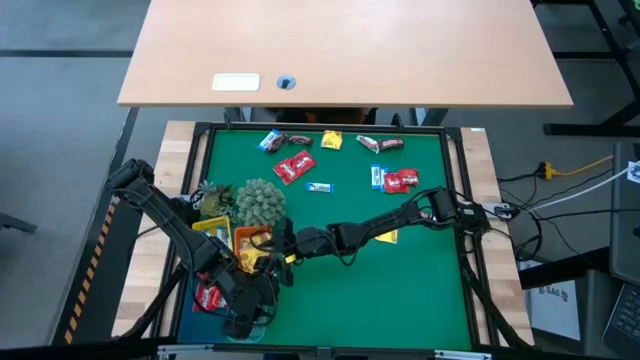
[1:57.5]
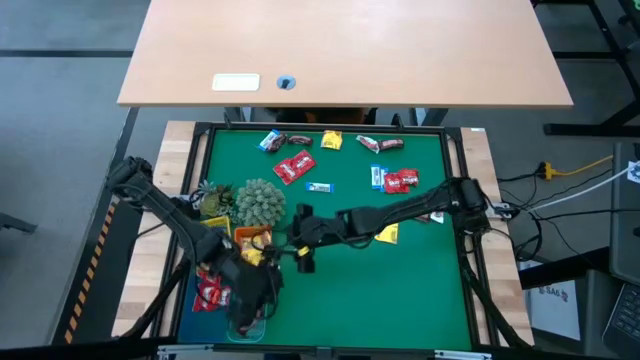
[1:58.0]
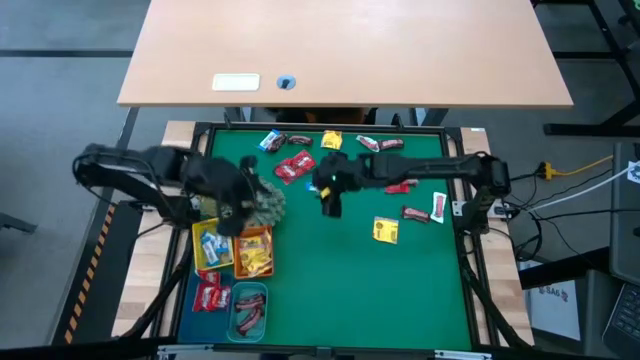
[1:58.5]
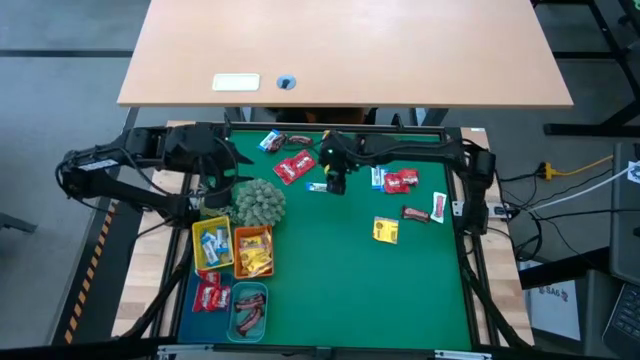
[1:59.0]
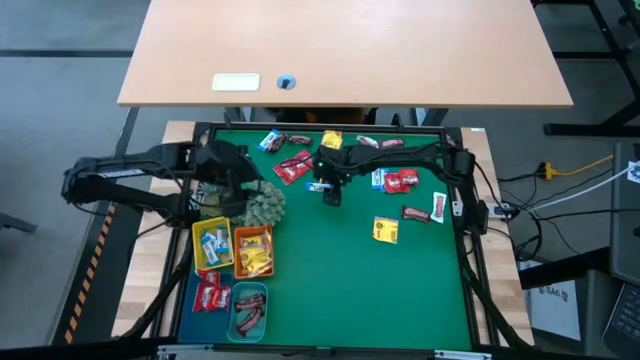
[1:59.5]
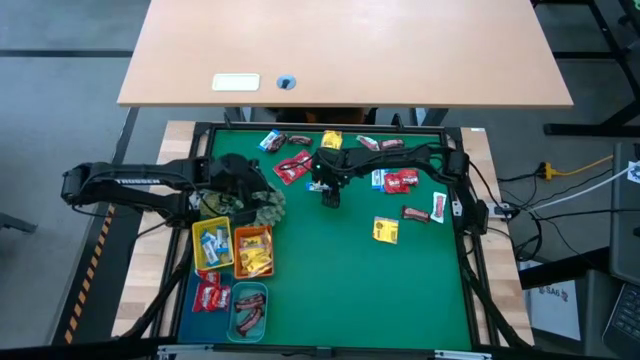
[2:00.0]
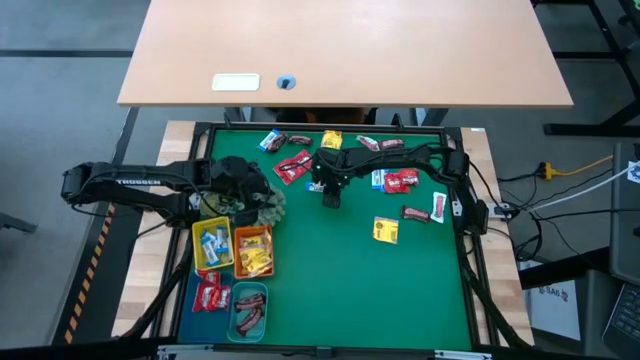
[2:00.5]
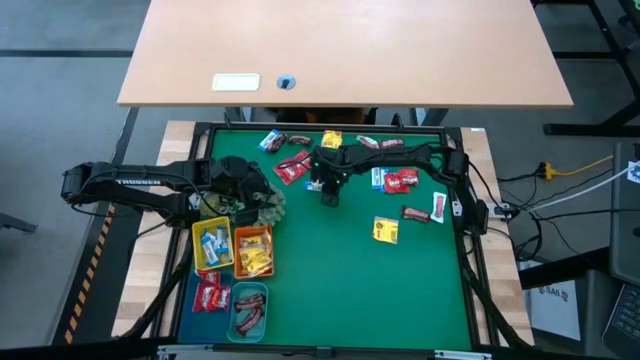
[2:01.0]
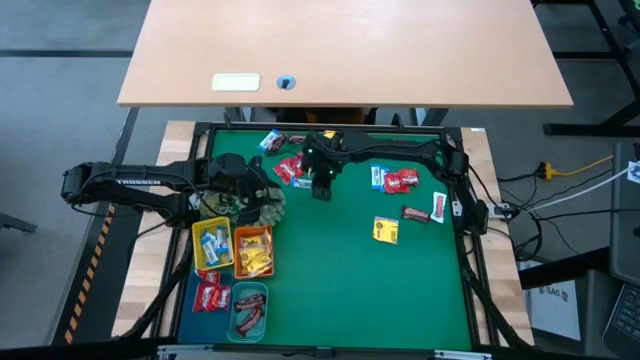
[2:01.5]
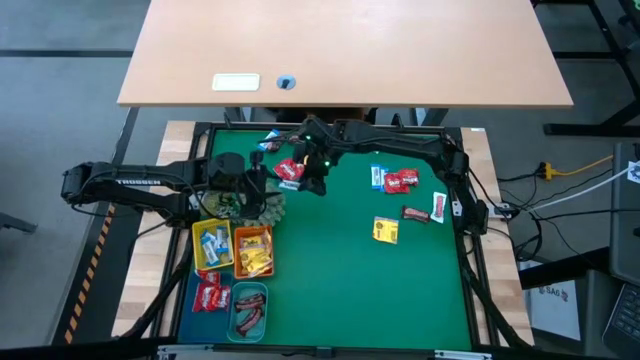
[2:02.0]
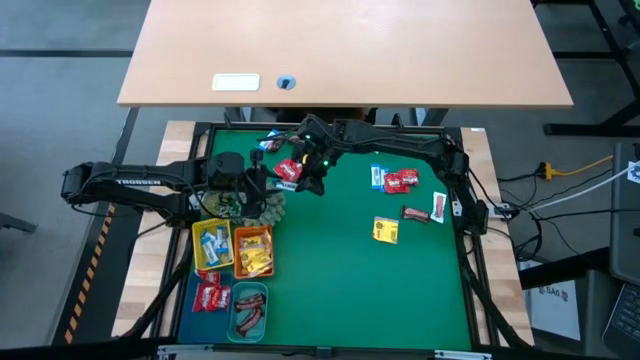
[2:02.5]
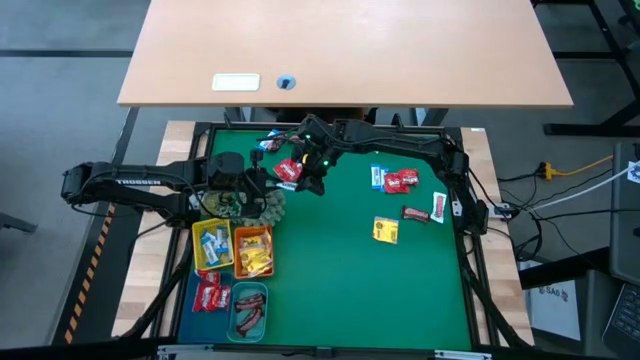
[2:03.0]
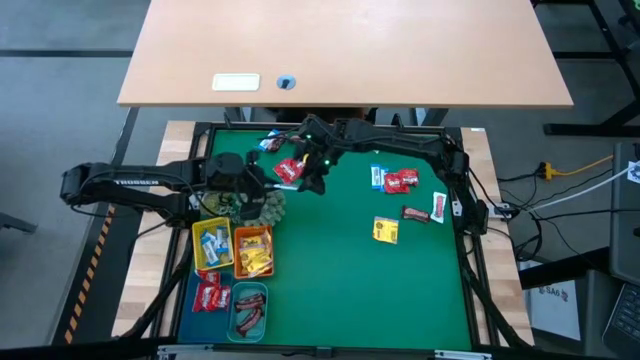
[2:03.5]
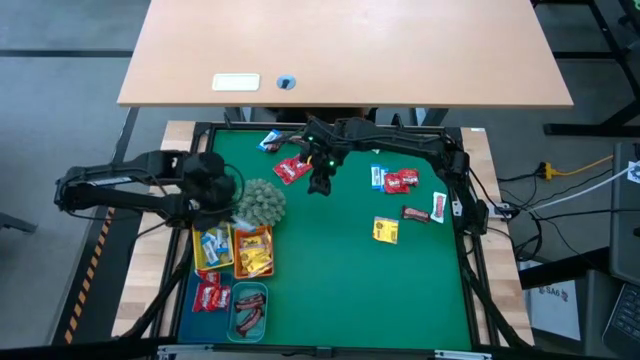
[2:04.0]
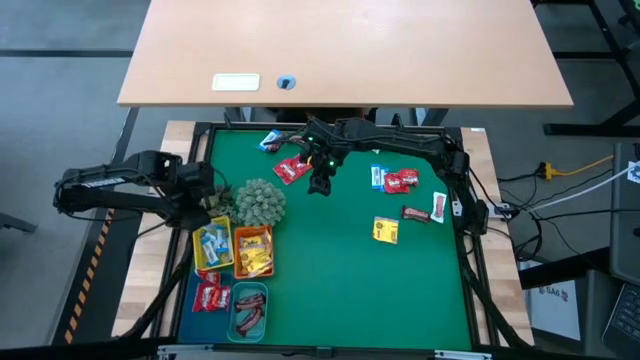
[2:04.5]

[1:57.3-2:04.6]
Task: Sort candy
Put the white chocolate into the yellow basket

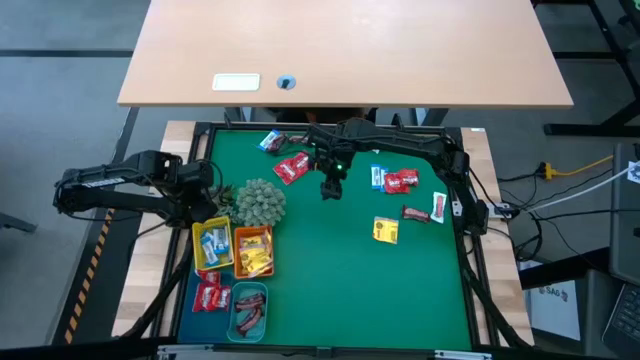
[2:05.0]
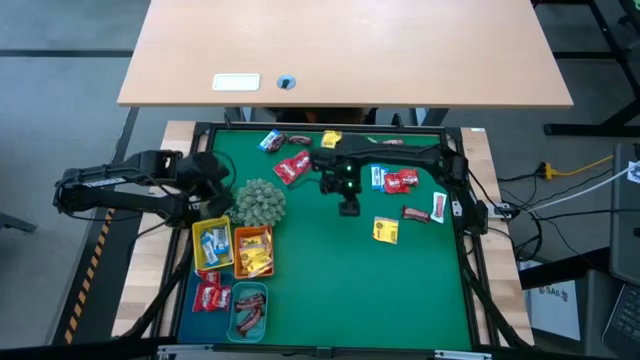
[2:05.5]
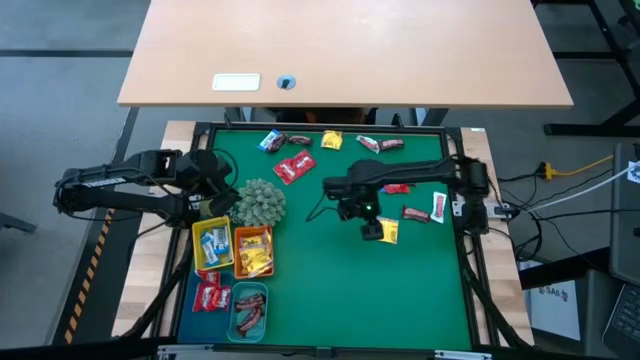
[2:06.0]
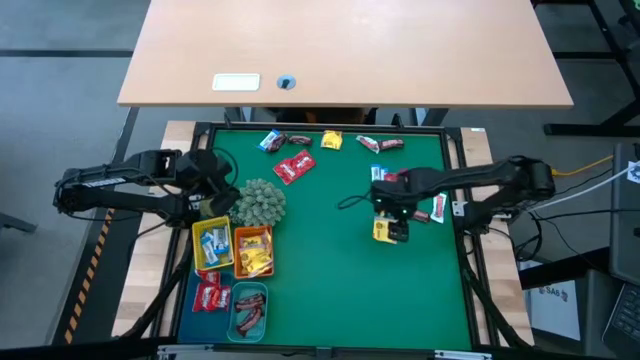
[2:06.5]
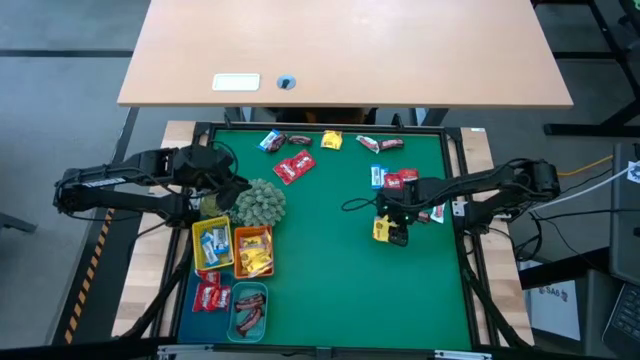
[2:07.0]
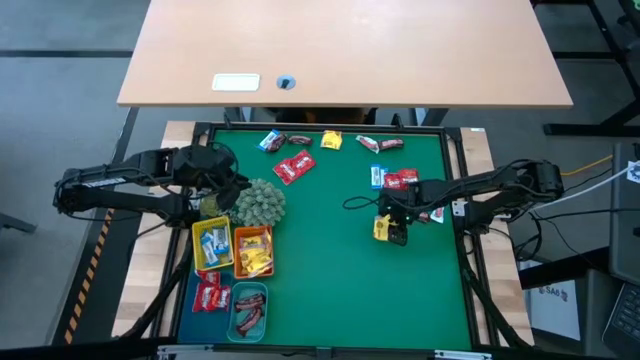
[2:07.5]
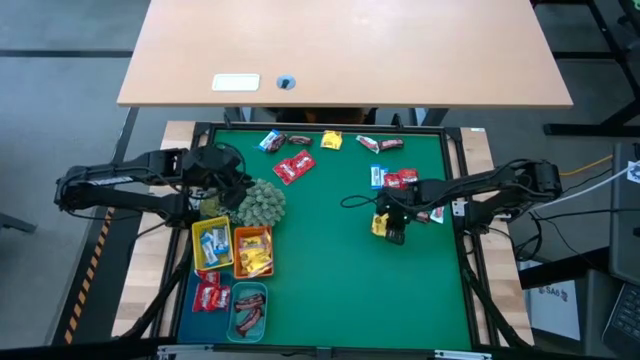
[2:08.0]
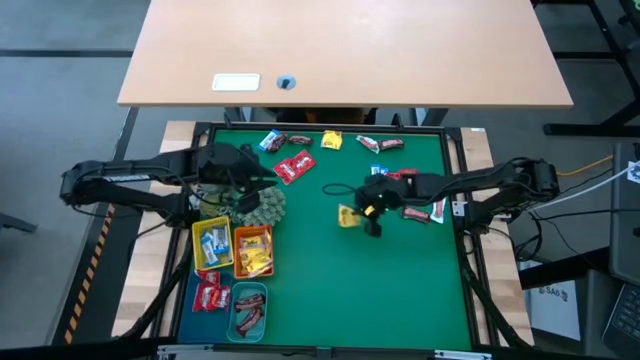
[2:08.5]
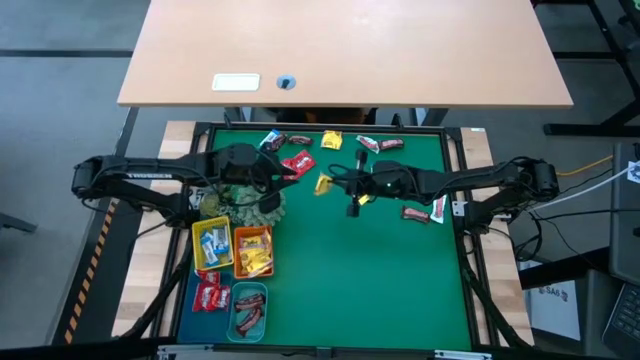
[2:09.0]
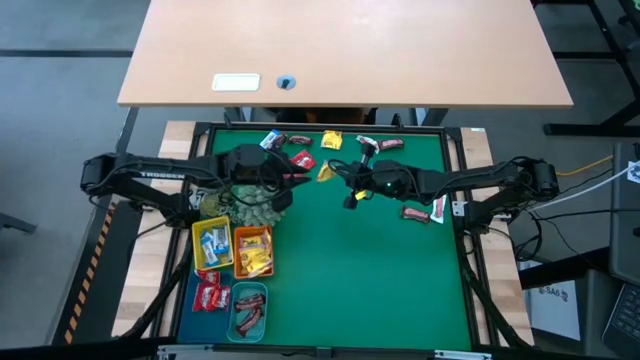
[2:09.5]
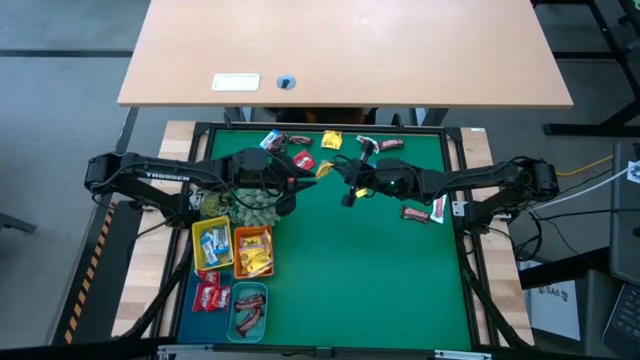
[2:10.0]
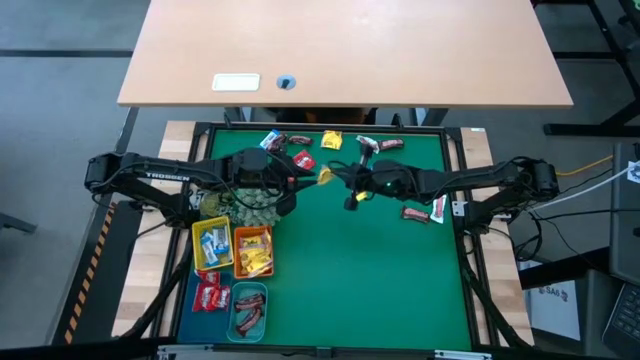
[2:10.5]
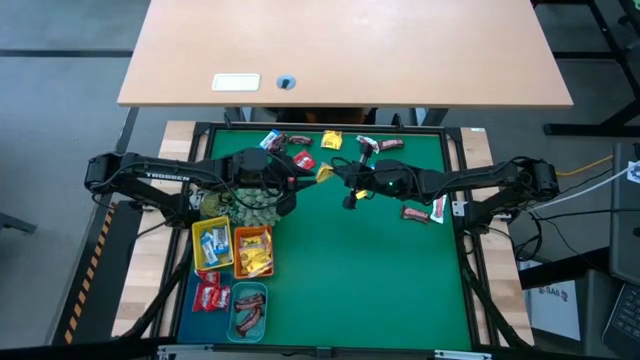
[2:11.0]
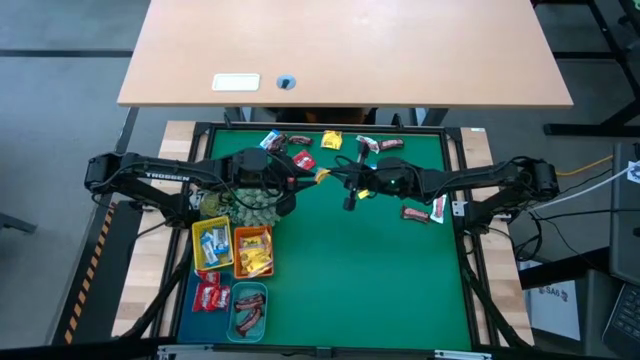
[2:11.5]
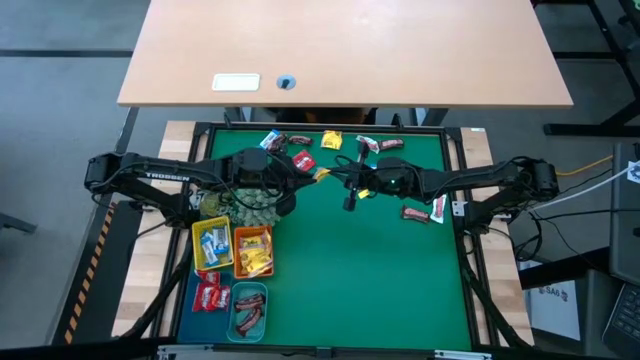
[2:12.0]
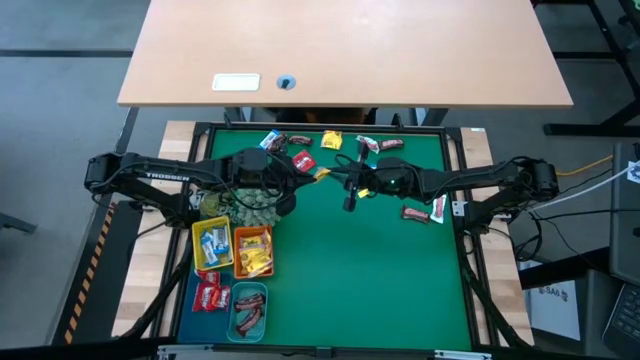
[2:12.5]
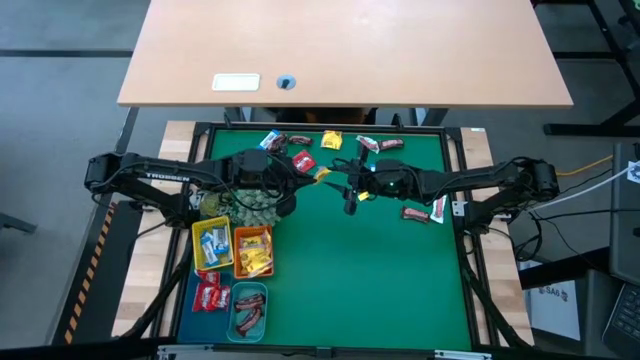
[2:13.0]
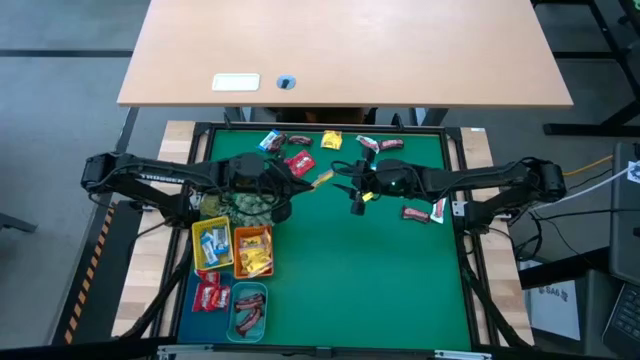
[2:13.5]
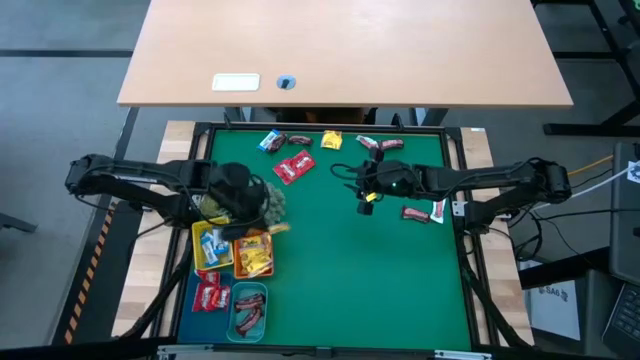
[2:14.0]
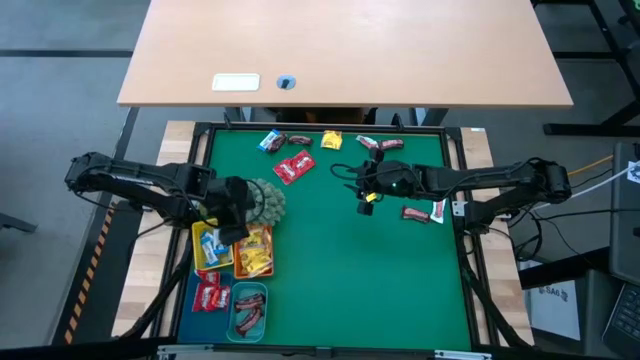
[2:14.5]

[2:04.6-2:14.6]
Put the yellow candy into the orange basket

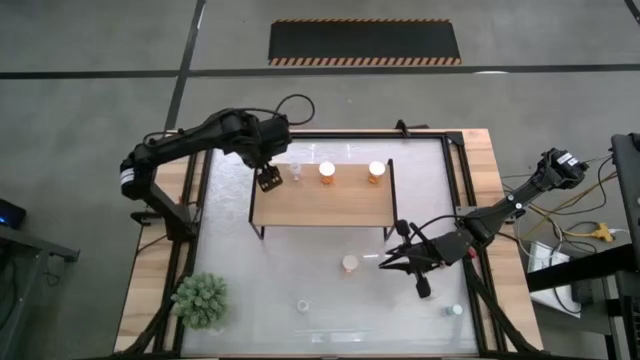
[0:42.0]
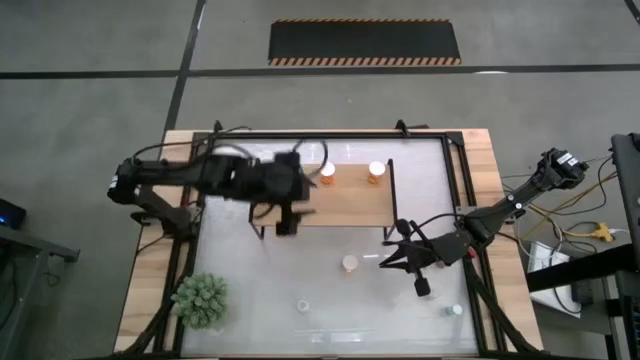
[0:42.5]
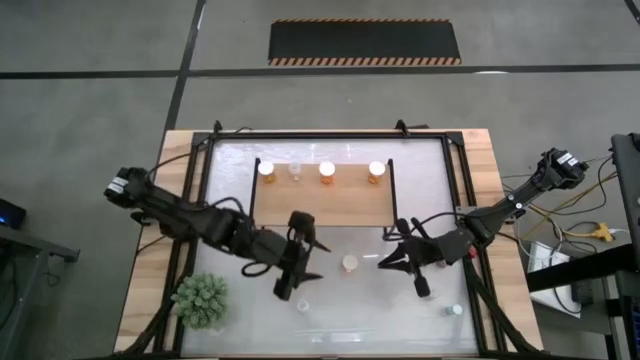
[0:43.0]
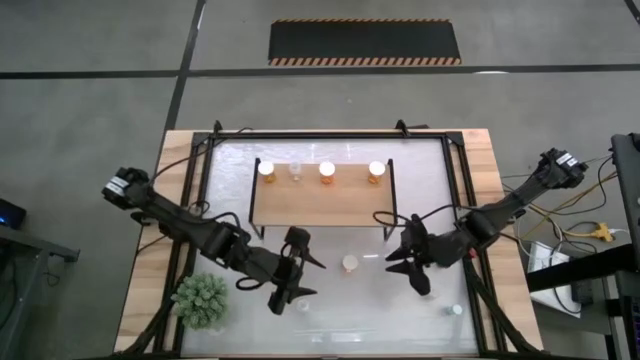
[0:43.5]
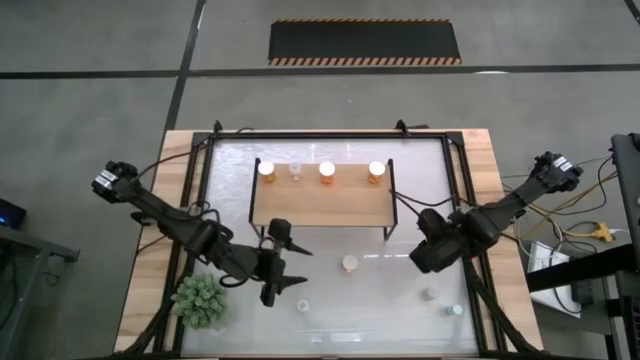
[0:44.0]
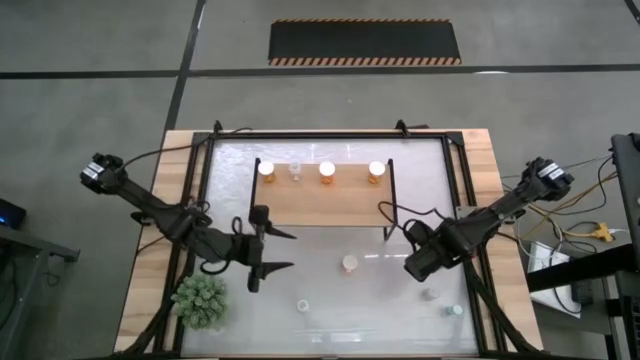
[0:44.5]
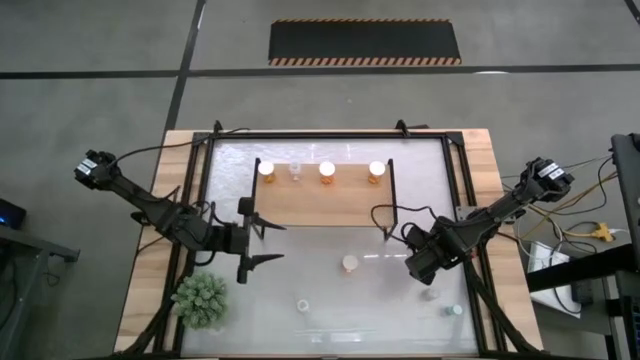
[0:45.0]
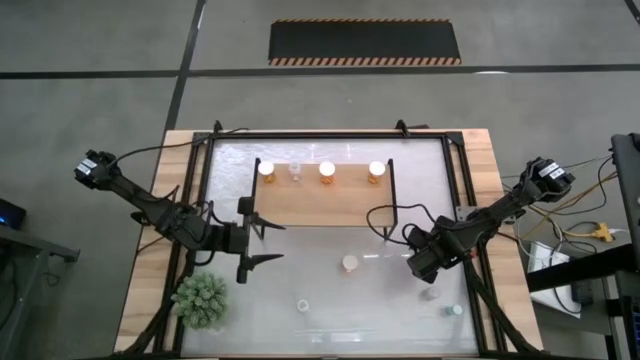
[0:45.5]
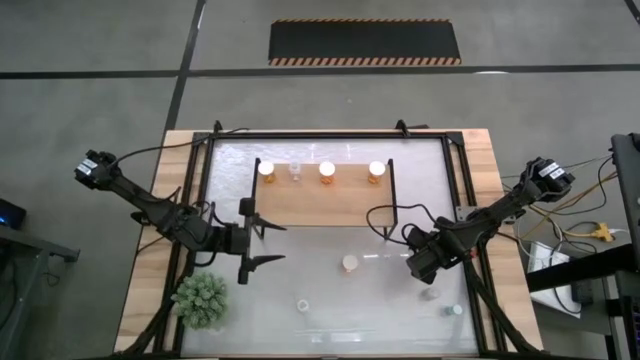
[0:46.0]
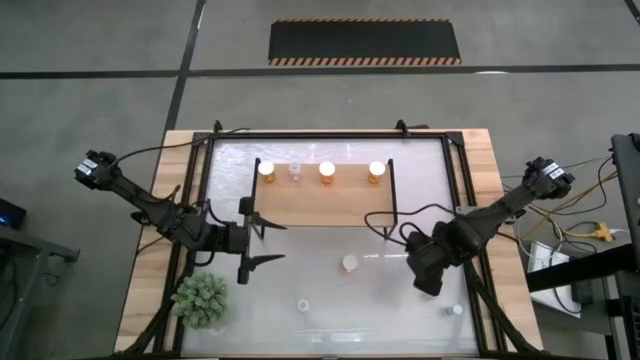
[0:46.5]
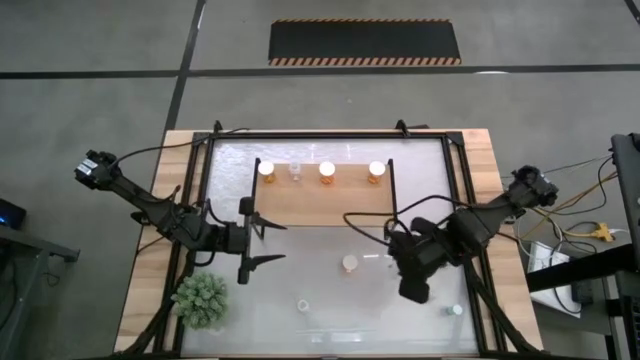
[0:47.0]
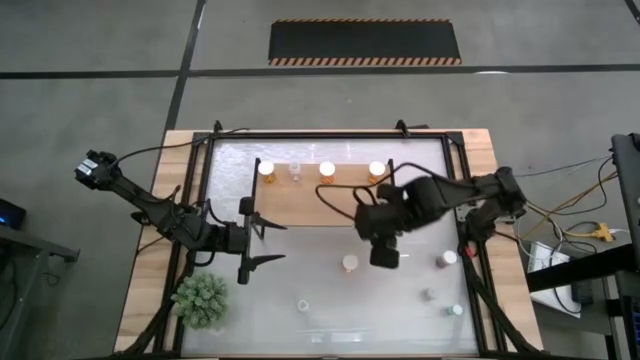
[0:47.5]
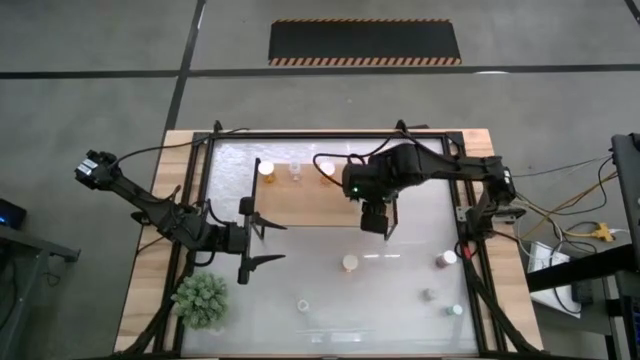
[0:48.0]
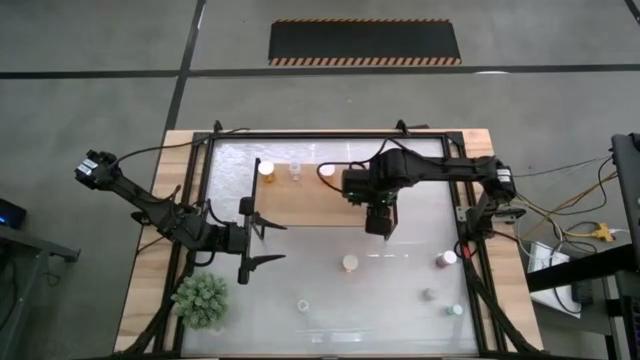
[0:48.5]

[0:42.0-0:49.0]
Task: Pick and place medicine bottles onto shelf by color
Put the right white pill bottle on the shelf
